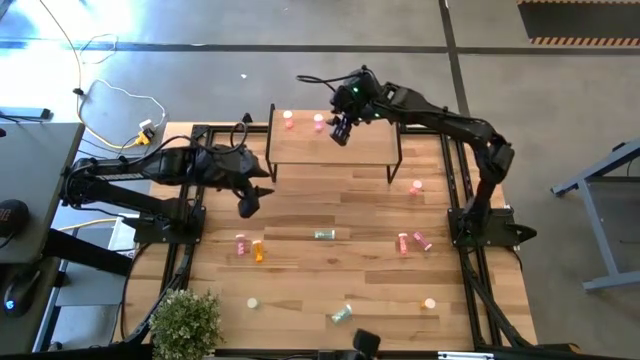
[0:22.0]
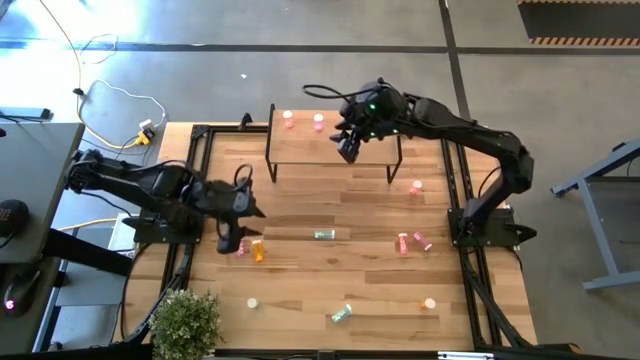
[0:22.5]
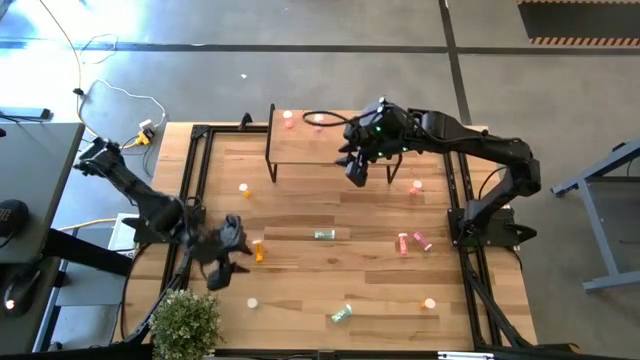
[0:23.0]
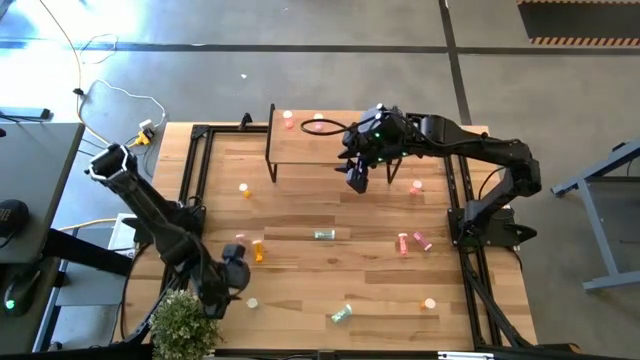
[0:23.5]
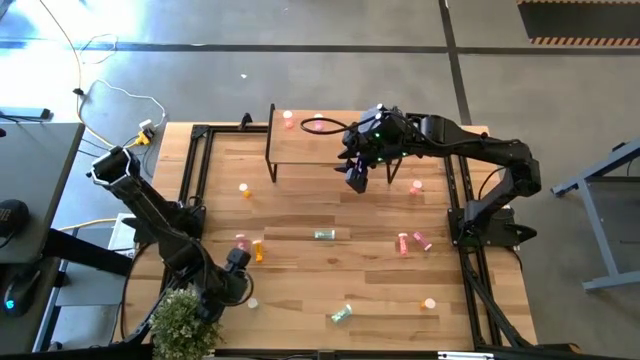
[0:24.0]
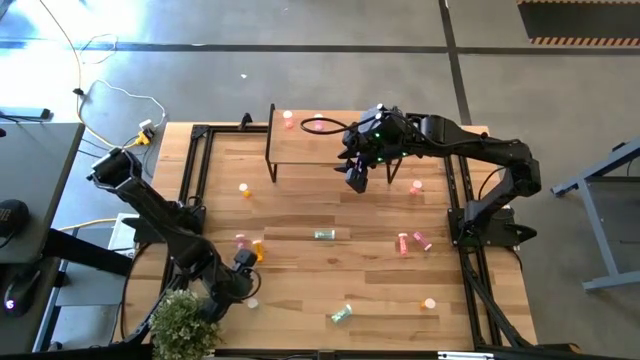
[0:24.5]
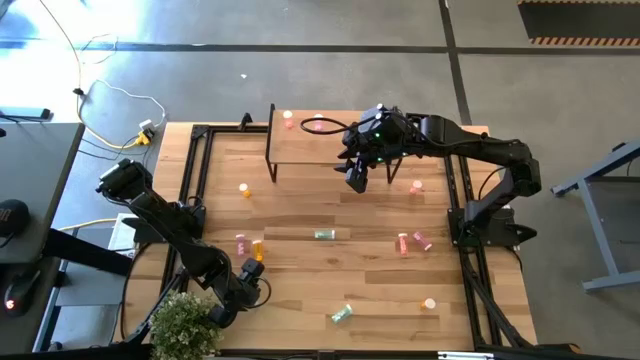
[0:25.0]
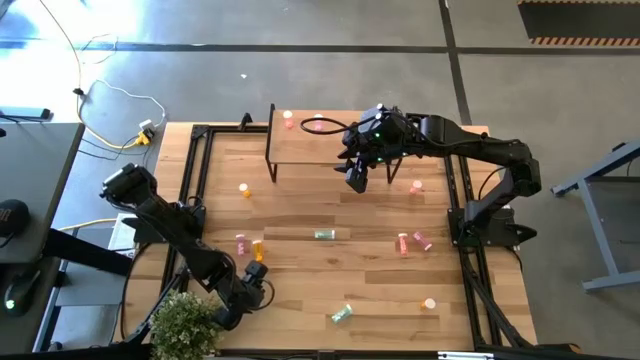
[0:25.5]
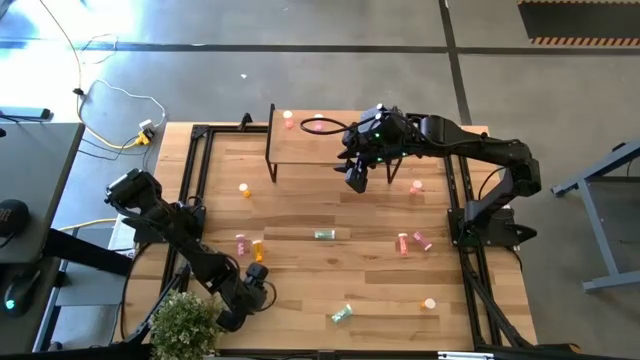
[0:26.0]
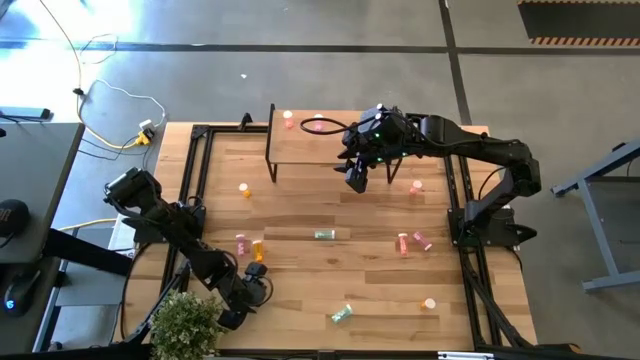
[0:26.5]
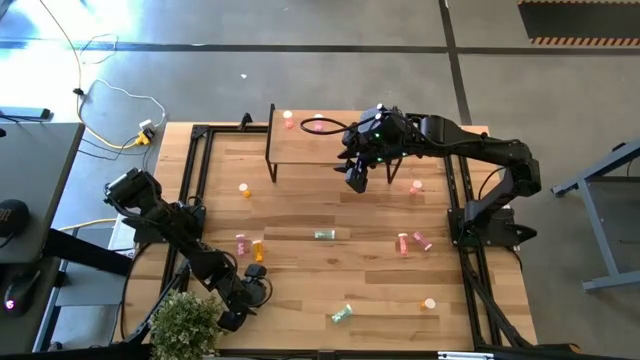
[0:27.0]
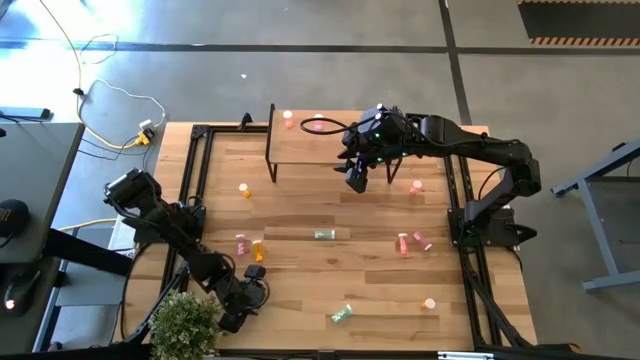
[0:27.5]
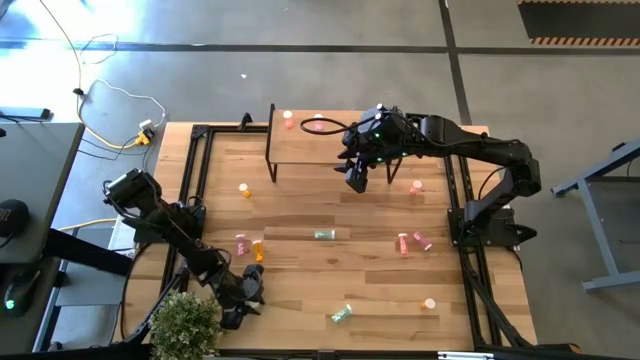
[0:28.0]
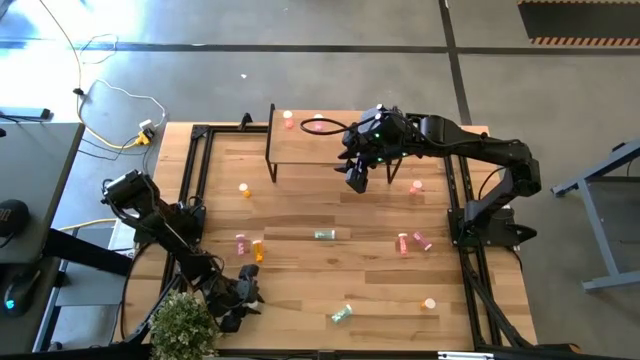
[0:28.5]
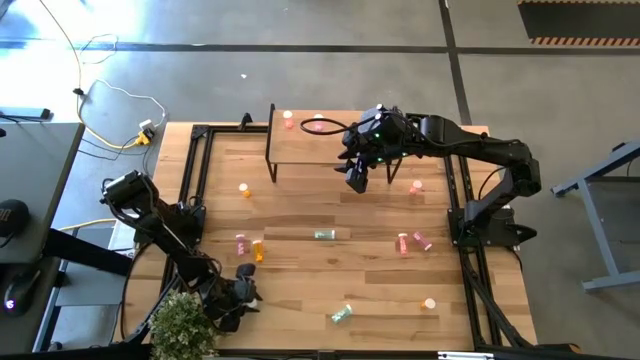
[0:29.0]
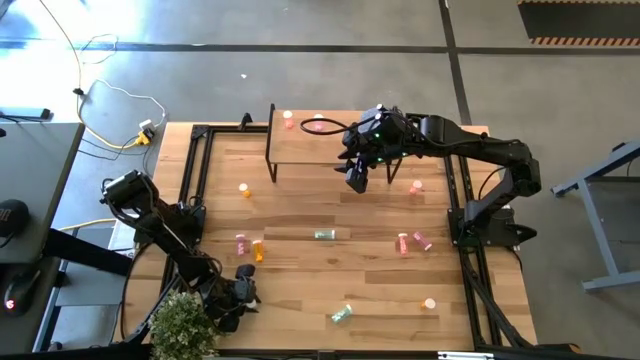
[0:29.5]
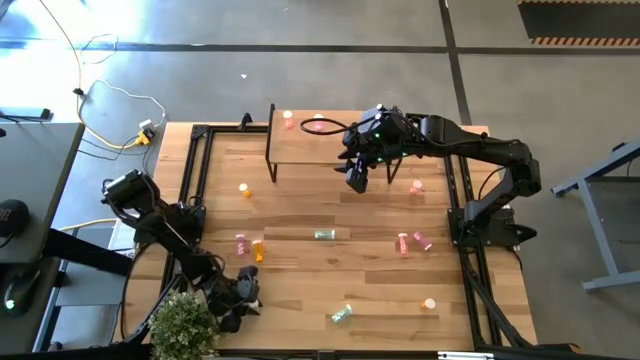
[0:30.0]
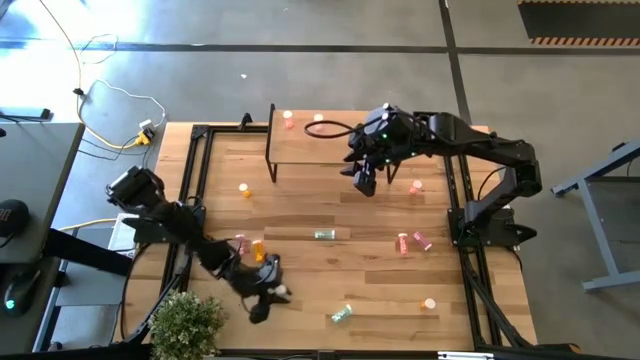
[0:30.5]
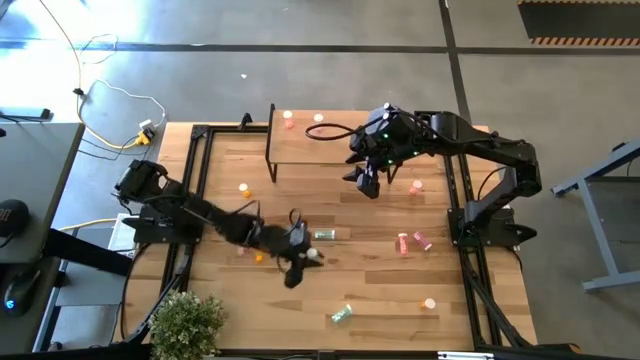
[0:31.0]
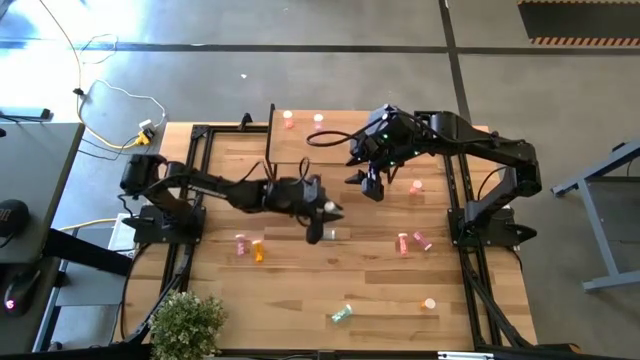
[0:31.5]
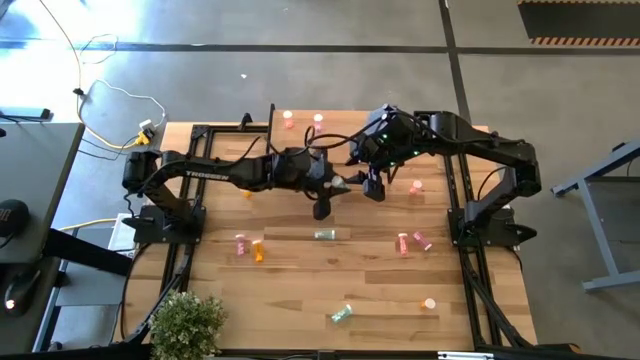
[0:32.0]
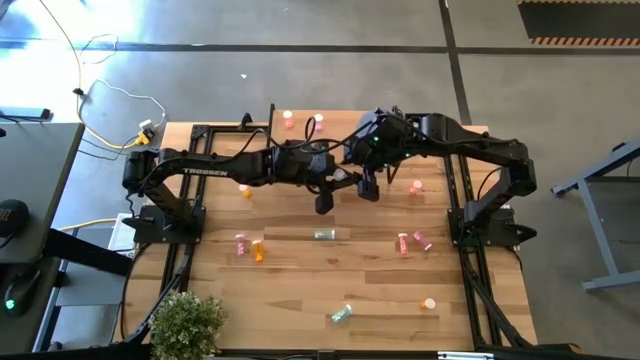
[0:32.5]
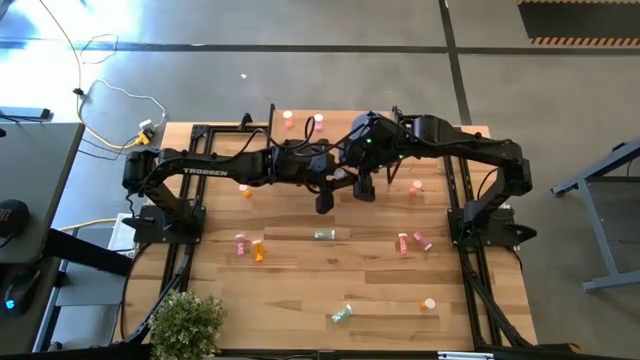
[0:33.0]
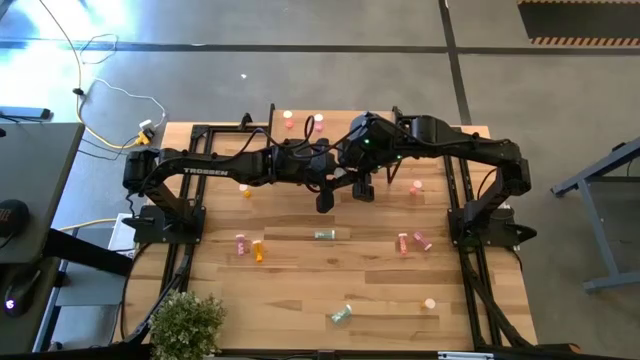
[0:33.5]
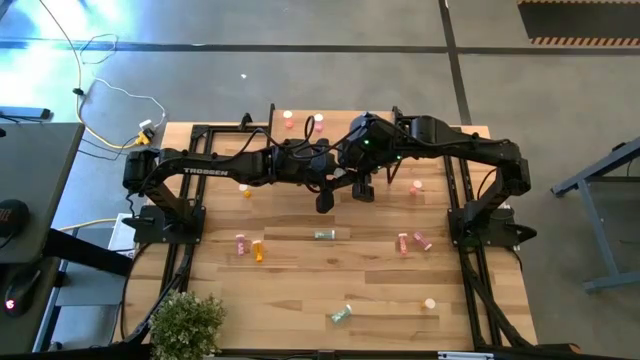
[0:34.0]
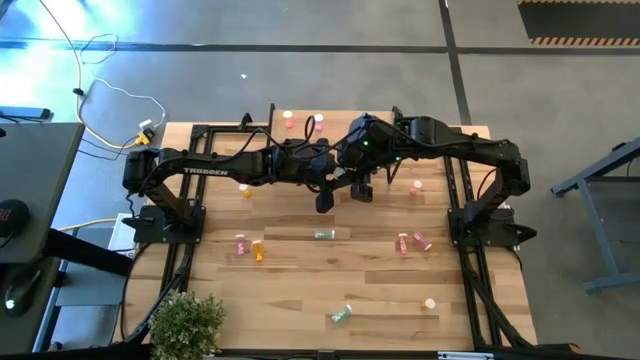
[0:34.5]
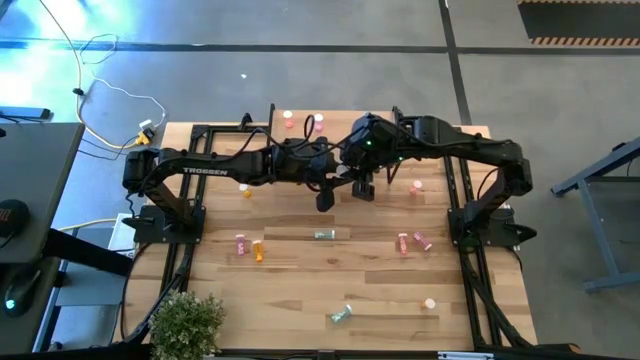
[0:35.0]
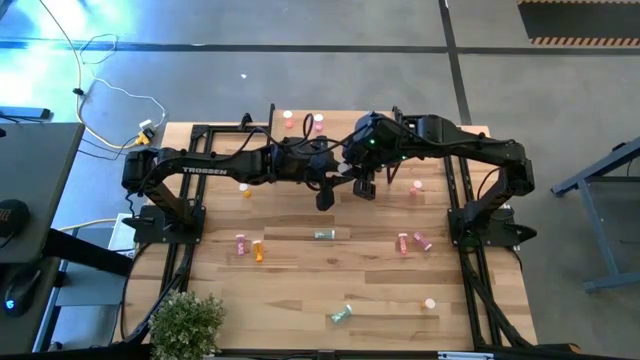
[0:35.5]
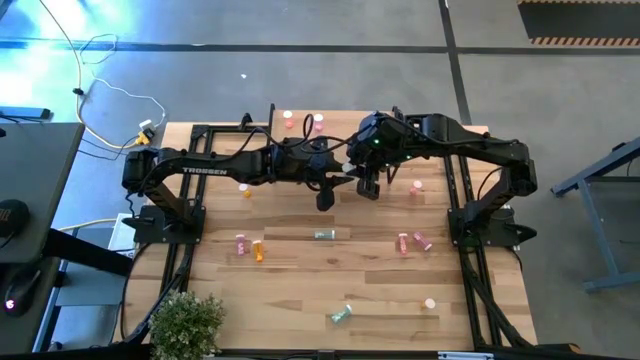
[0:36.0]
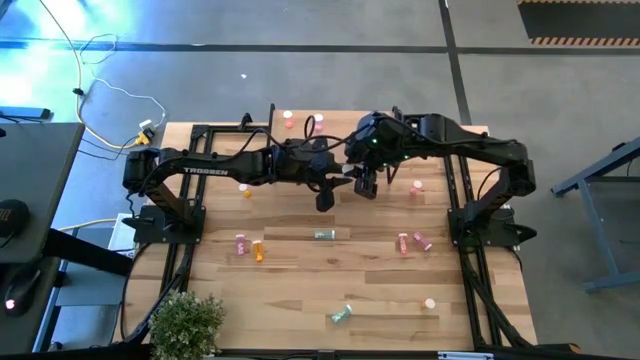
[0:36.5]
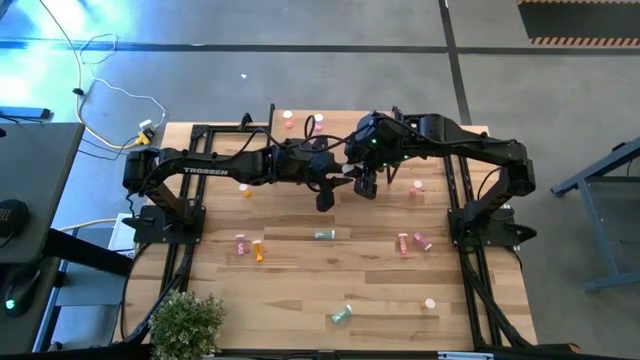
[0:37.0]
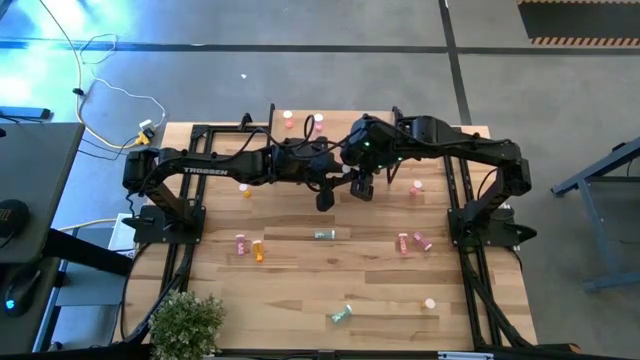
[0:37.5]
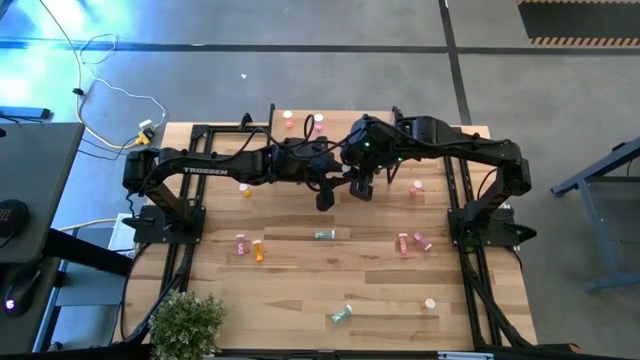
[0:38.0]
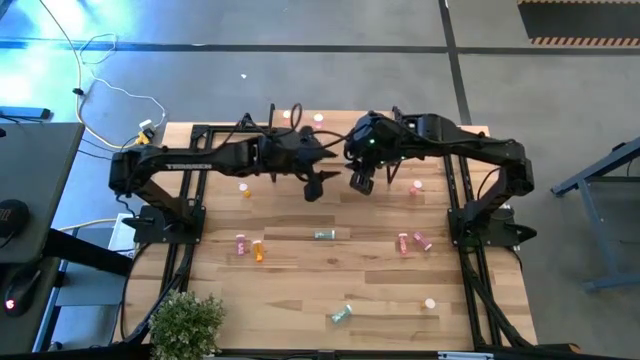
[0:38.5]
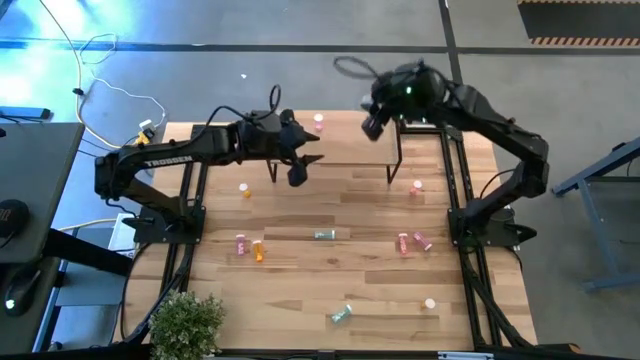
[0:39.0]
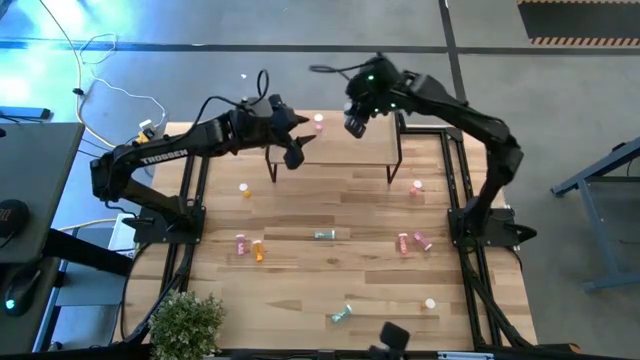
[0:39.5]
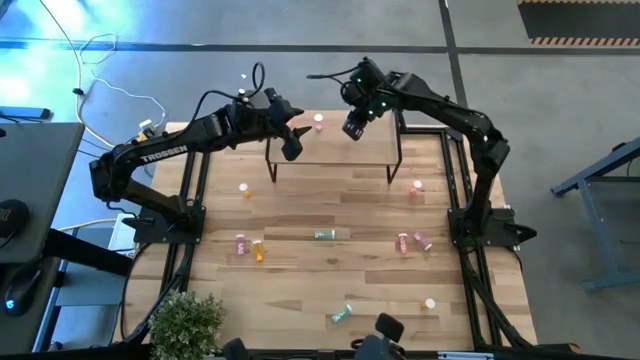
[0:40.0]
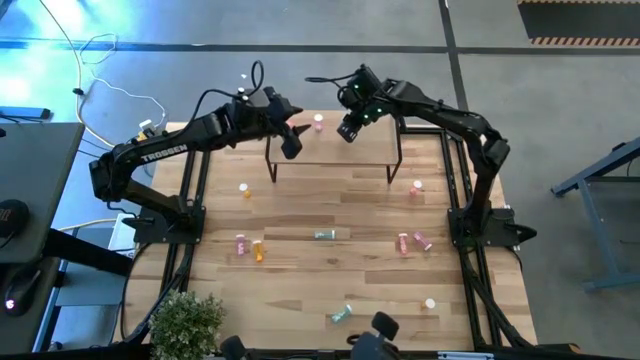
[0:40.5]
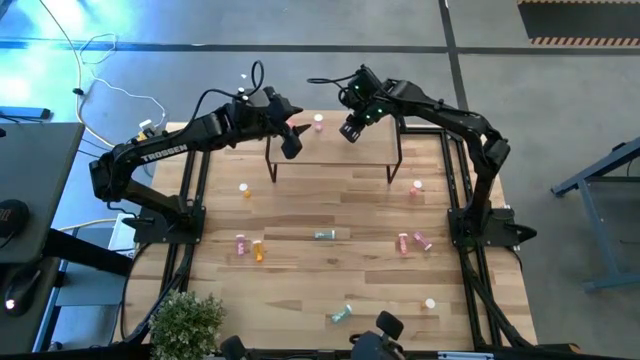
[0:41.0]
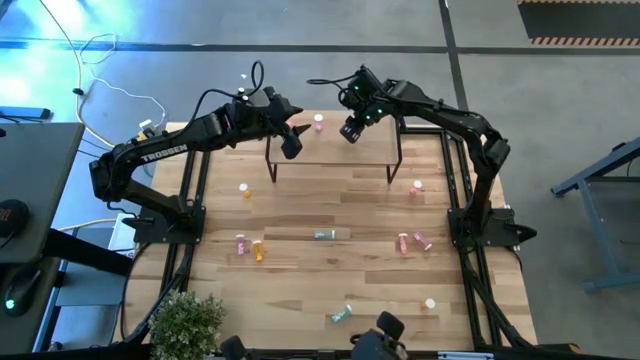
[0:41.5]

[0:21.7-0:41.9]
Task: Pick and place medicine bottles onto shelf by color
Put the bottom left blue pill bottle on the shelf
